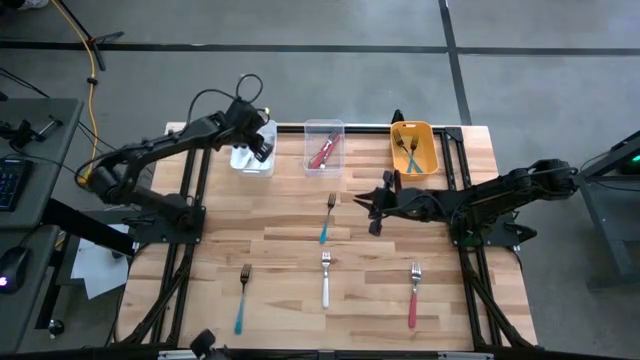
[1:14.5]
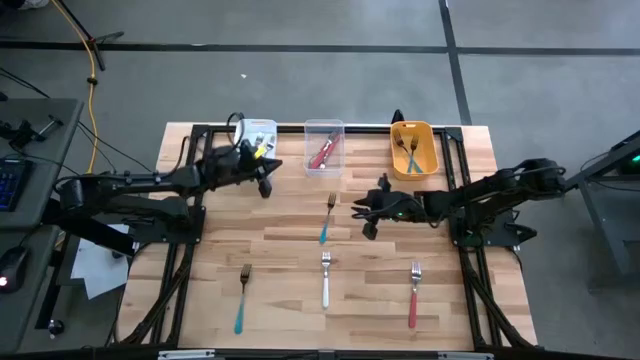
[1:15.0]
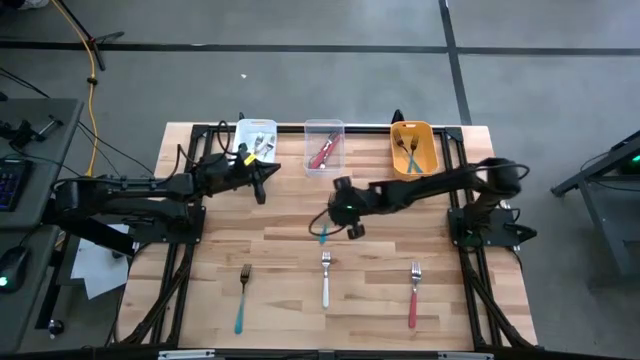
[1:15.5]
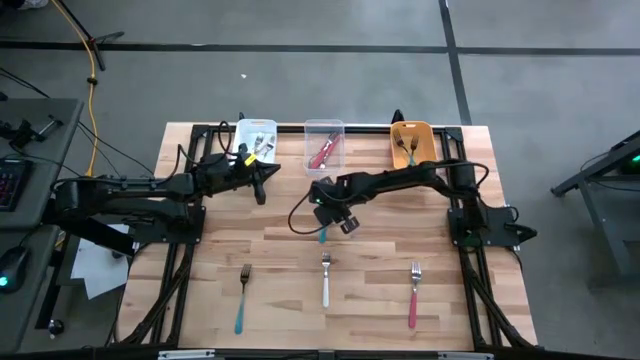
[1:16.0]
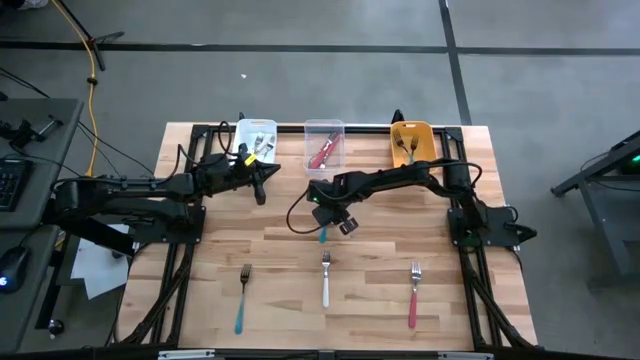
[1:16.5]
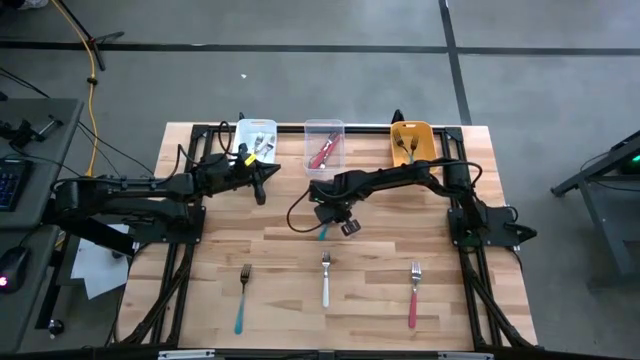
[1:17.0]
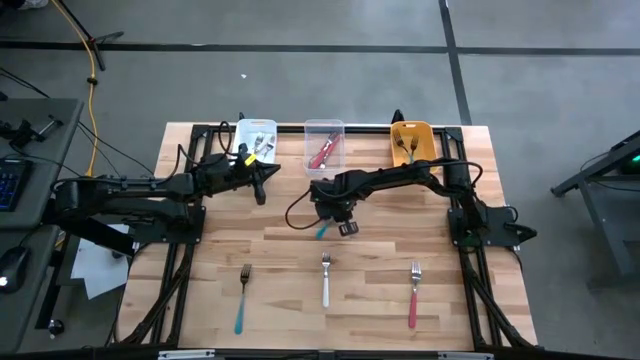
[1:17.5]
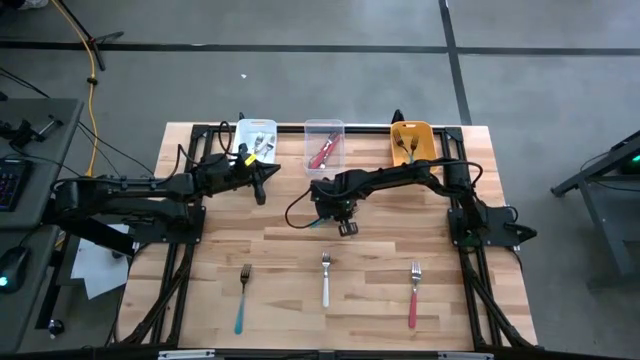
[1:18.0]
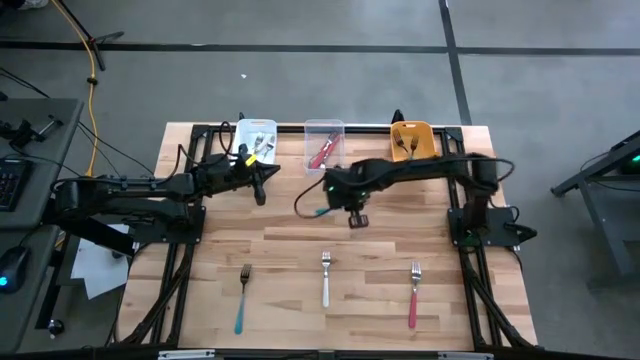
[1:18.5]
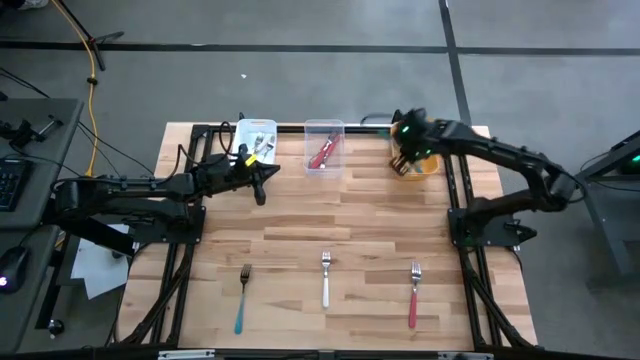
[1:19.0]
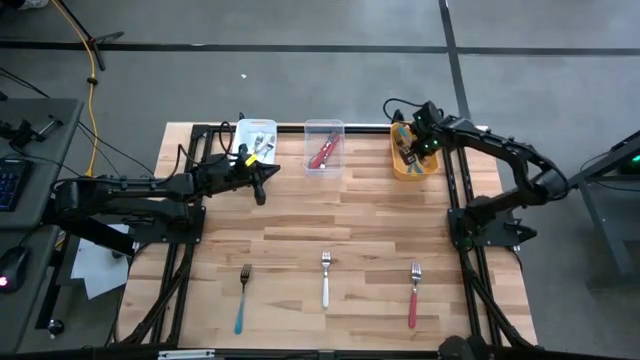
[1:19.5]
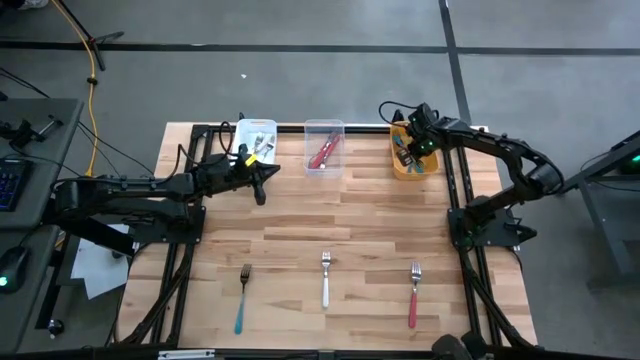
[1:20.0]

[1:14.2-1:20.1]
Task: Sort silverware by color (type)
Put the top blue fork into the yellow bin

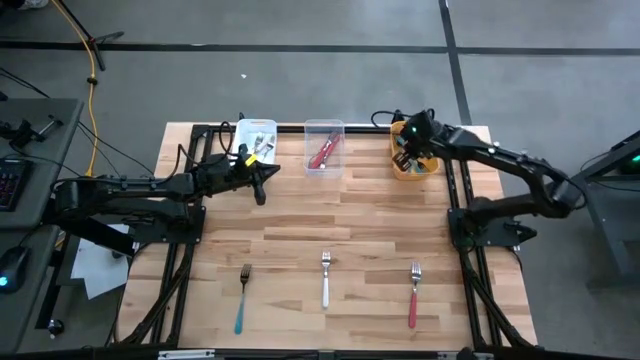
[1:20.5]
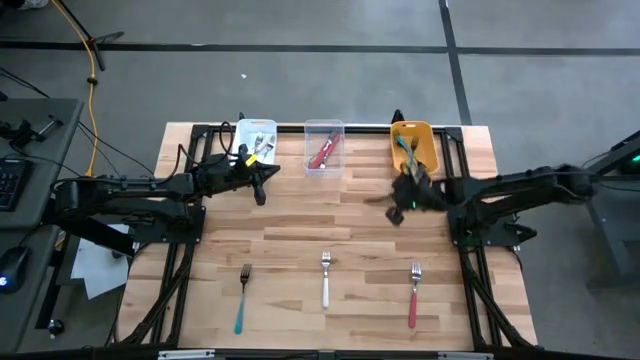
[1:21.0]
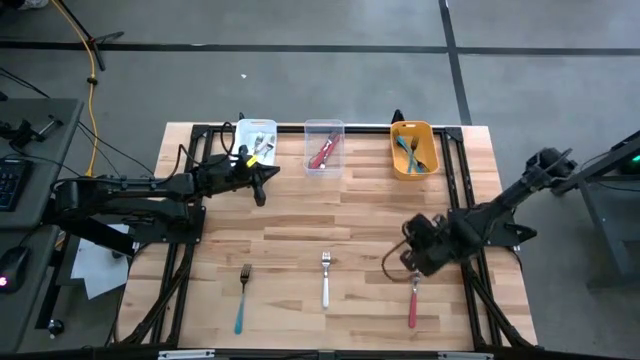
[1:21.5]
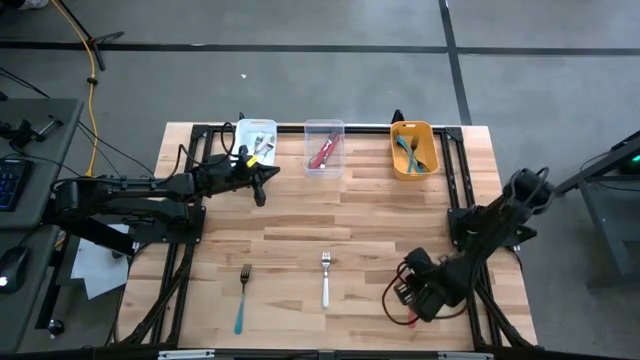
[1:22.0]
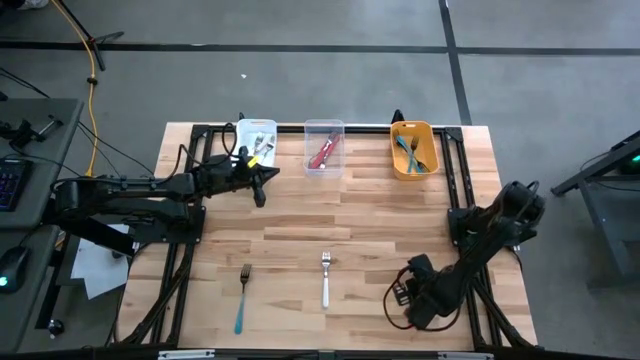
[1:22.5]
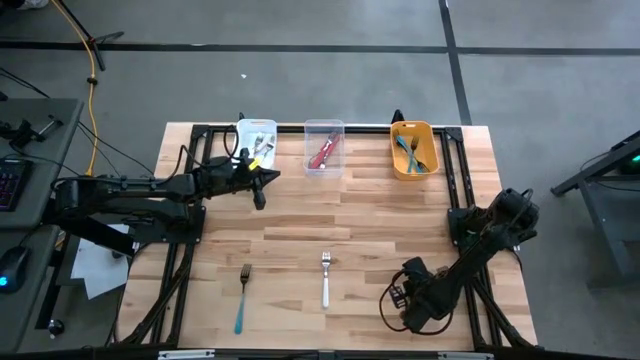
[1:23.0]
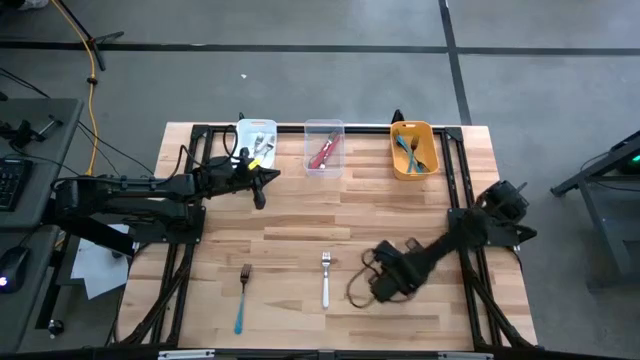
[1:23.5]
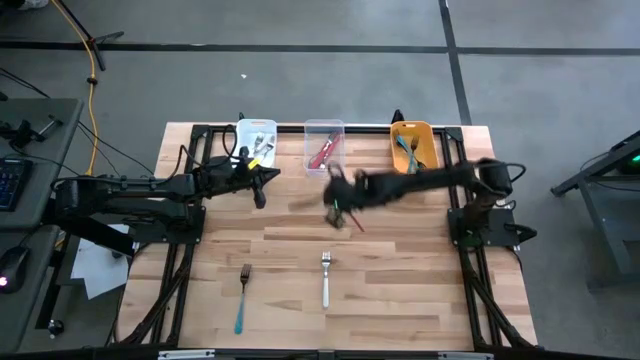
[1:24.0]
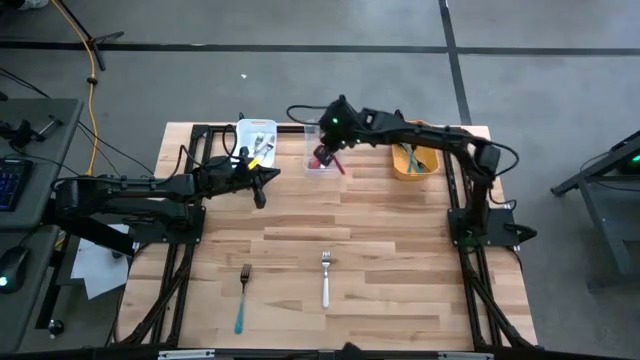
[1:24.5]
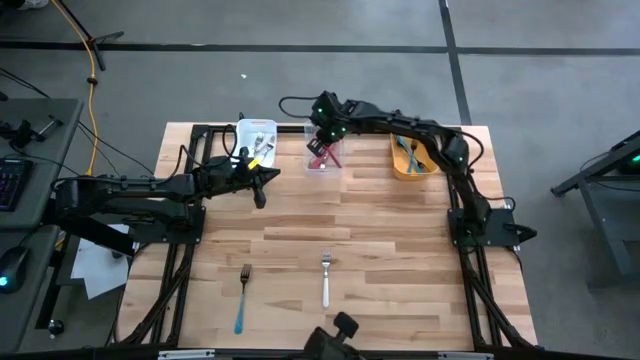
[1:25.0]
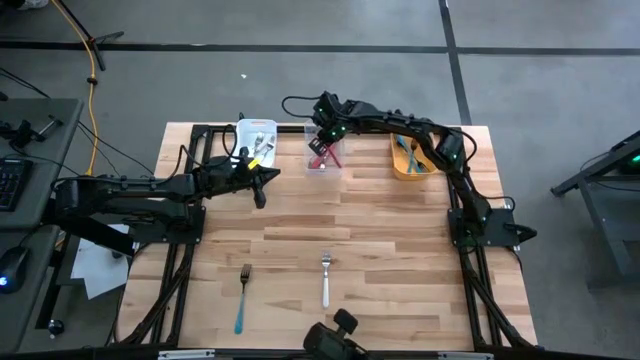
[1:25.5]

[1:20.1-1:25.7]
Put the pink fork into the transparent bin

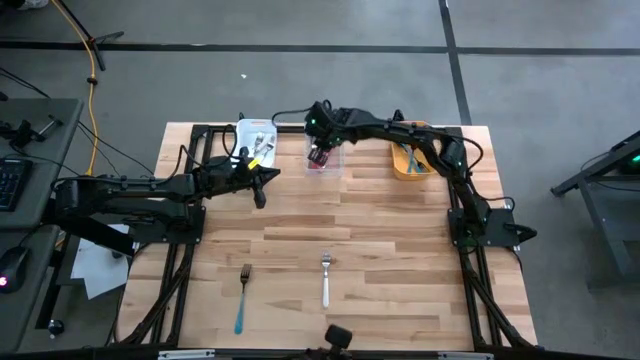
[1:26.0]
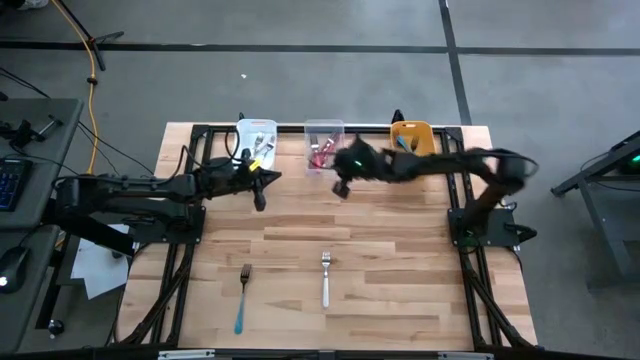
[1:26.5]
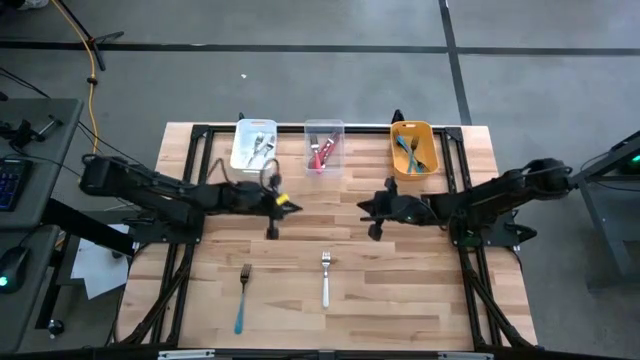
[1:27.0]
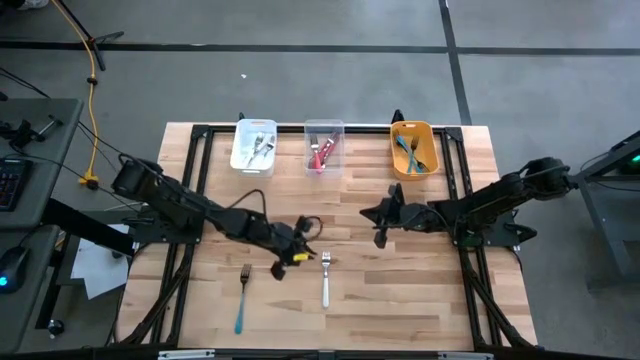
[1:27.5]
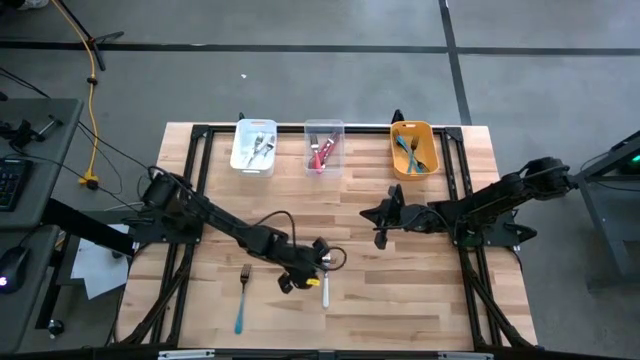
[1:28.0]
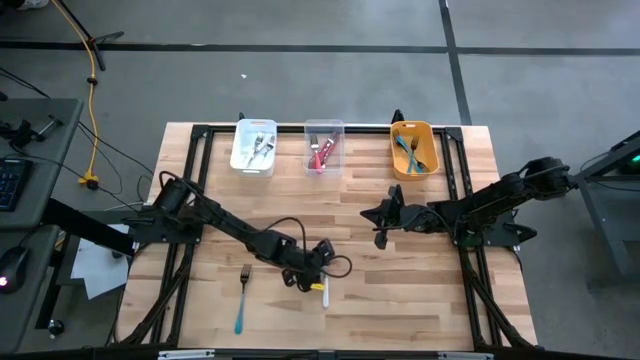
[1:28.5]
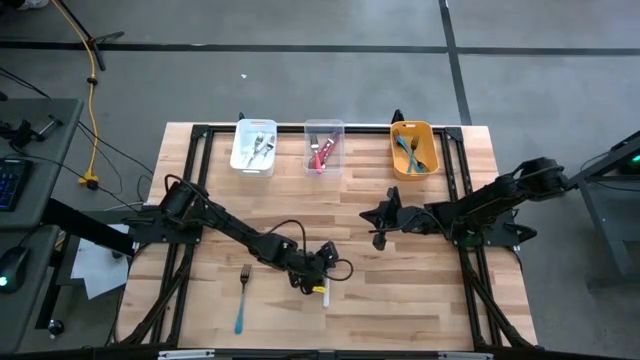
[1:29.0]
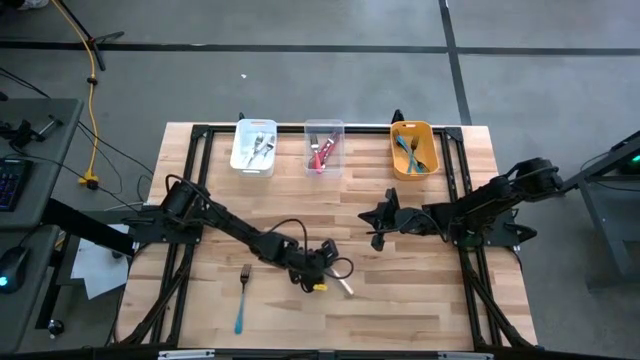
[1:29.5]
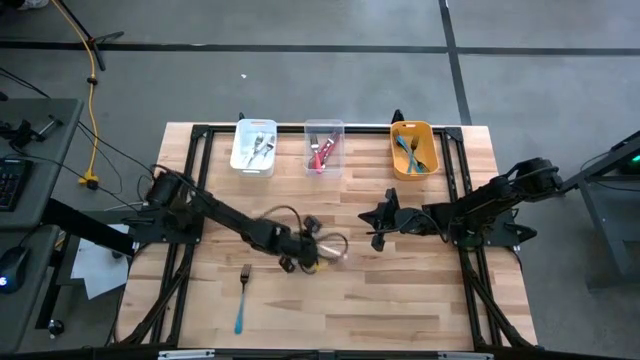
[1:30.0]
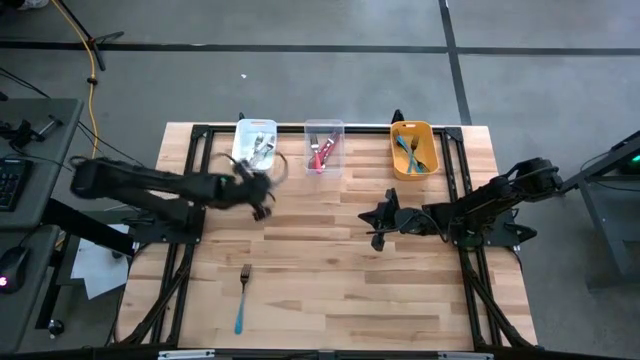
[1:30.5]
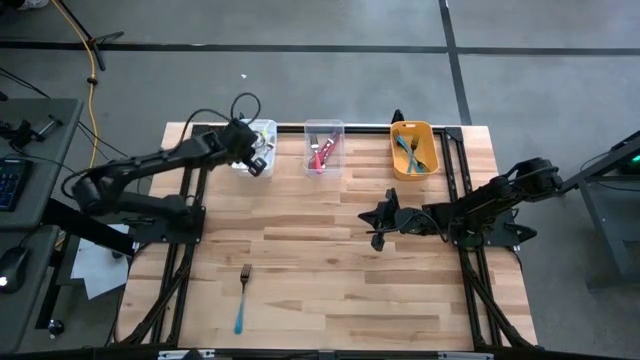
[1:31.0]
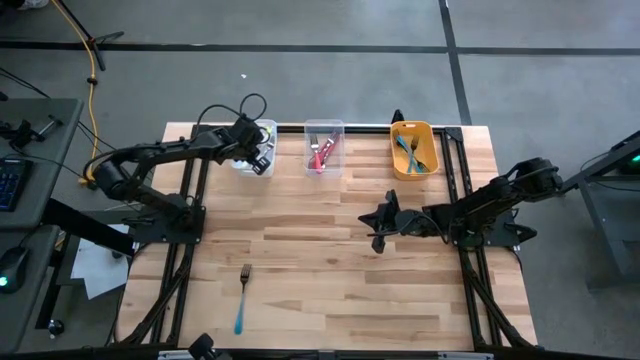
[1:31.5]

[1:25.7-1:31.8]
Put the white fork into the white bin

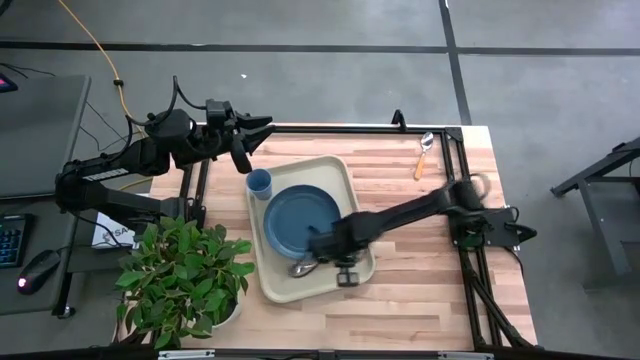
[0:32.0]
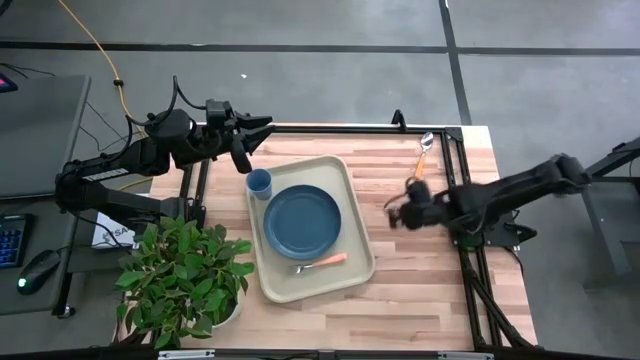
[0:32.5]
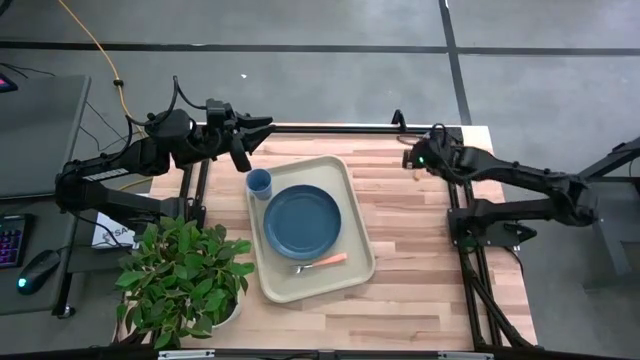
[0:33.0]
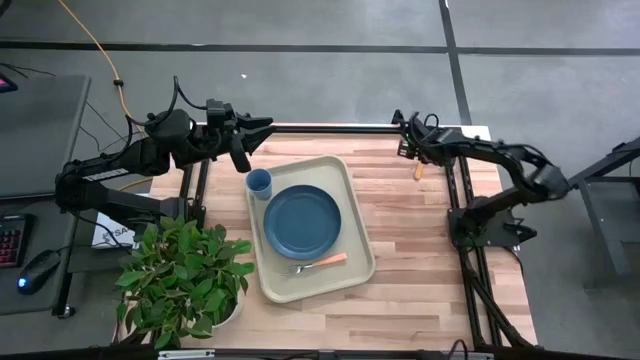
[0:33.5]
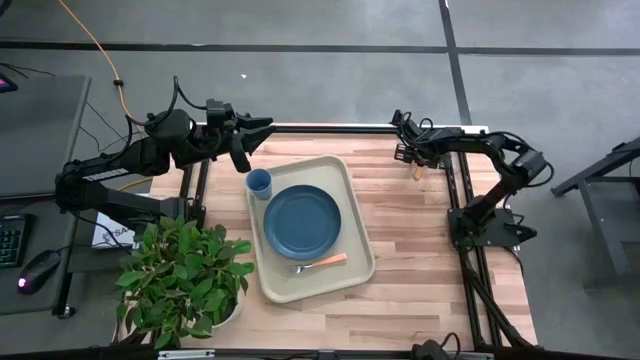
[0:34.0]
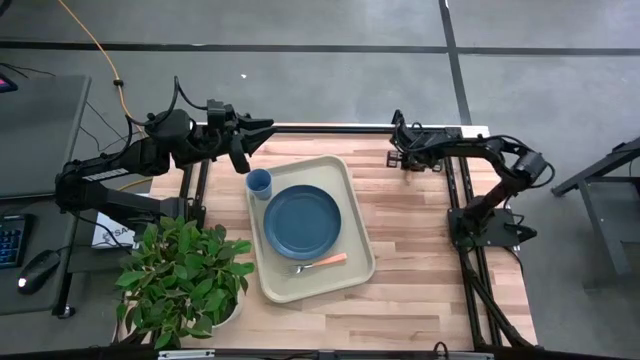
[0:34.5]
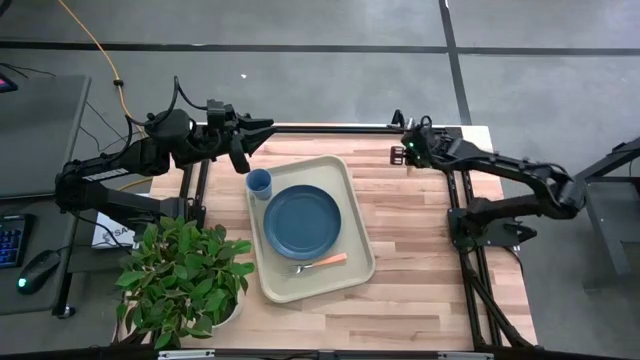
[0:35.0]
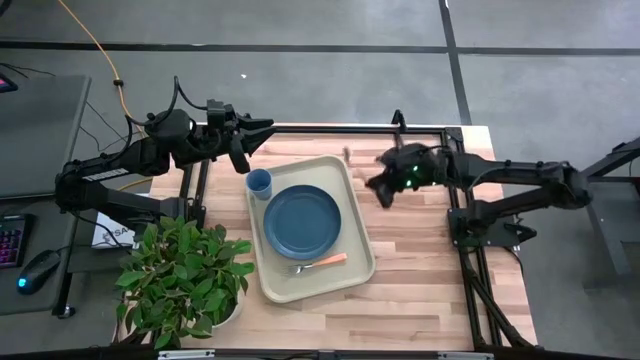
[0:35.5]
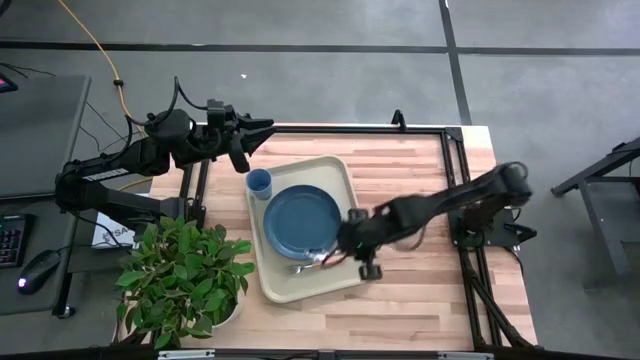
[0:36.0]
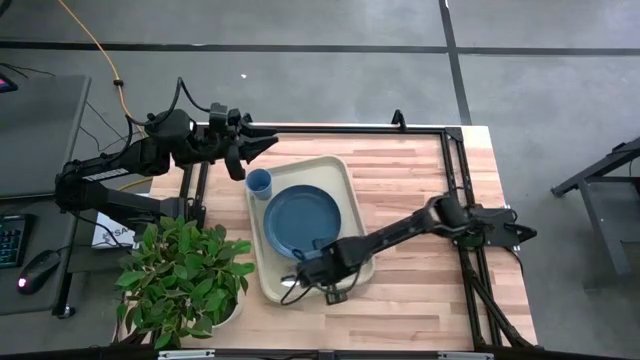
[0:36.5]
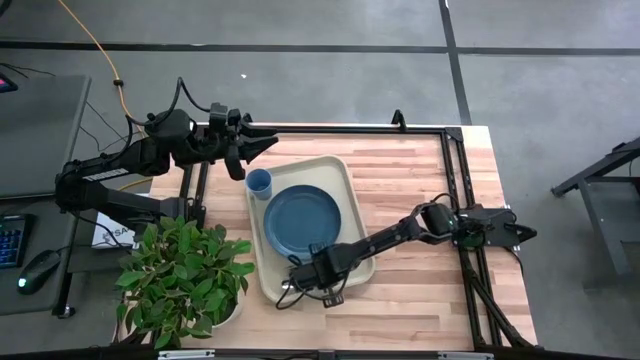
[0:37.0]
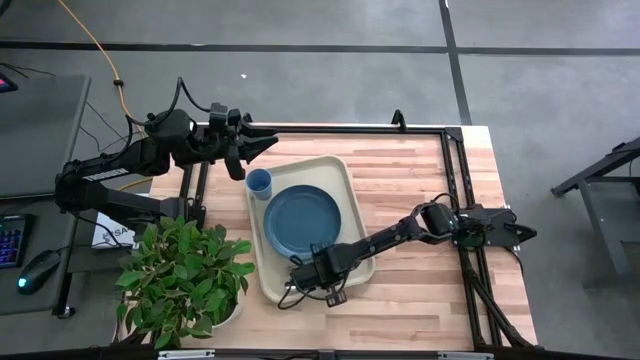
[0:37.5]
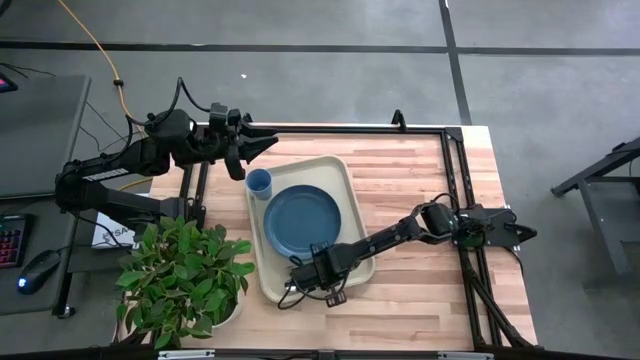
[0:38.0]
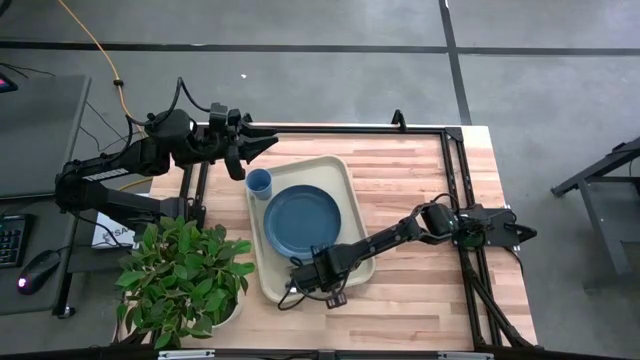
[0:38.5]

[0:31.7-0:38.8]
Task: Pick and place plate/cup/fork/spoon on tray
Put the yellow spoon on the white serving tray to the left of the orange fork
